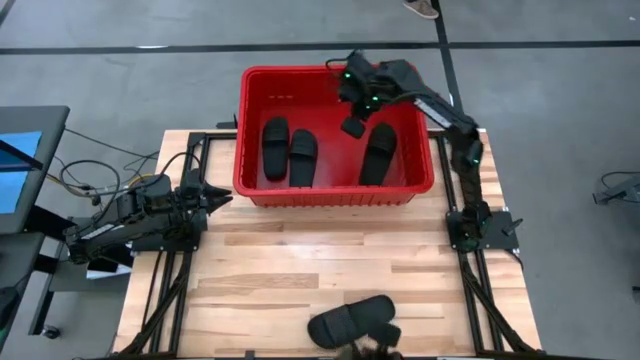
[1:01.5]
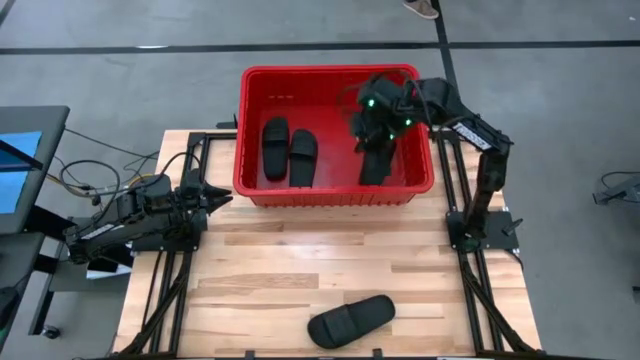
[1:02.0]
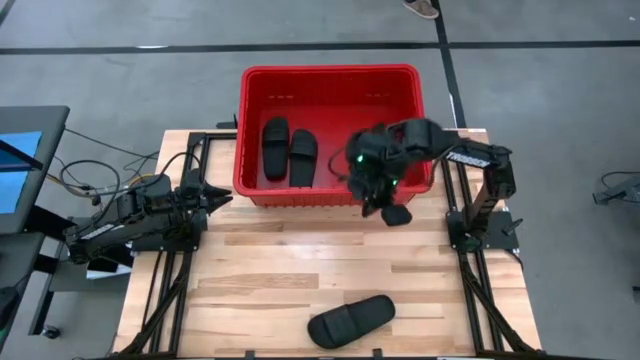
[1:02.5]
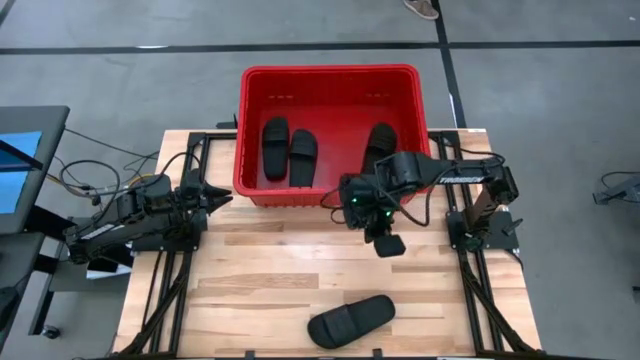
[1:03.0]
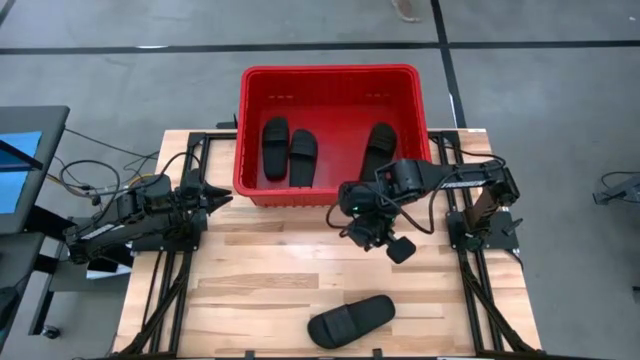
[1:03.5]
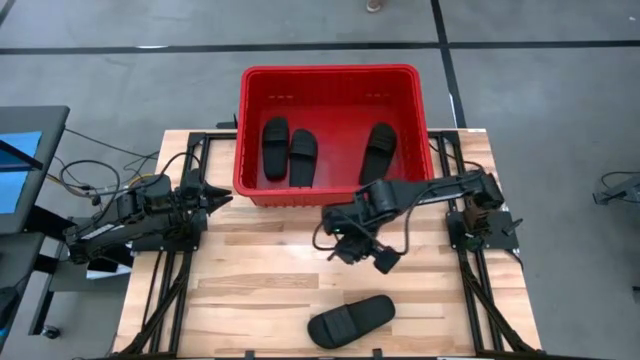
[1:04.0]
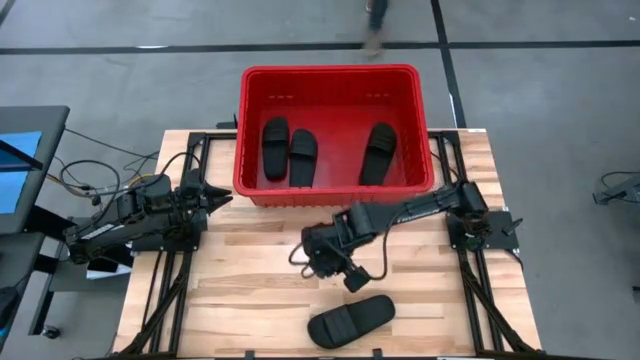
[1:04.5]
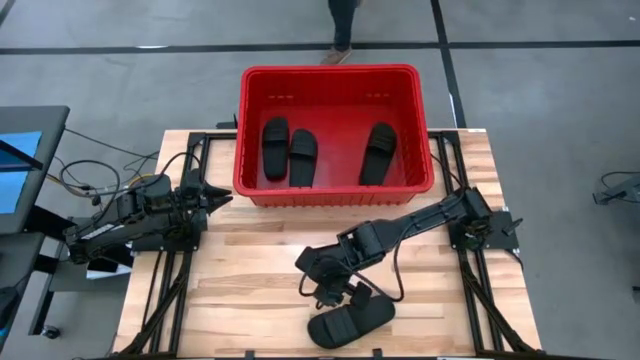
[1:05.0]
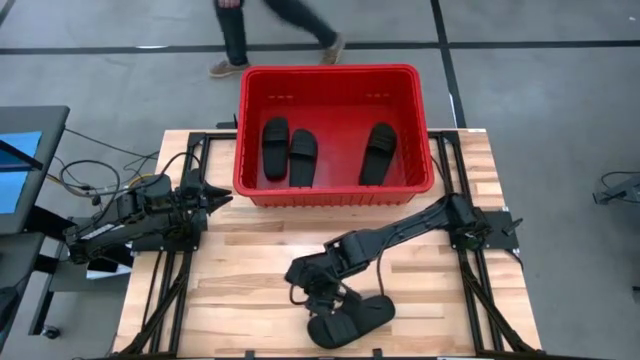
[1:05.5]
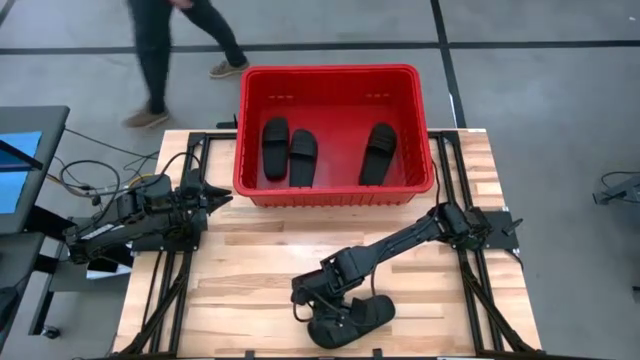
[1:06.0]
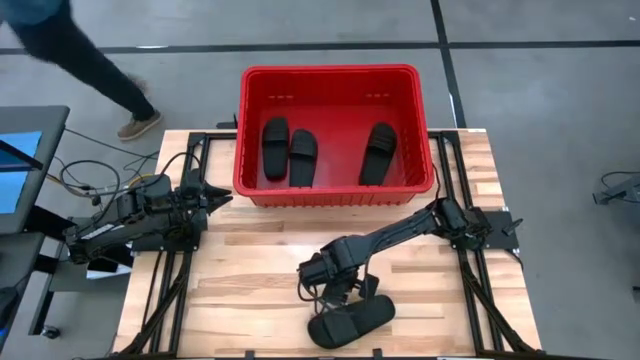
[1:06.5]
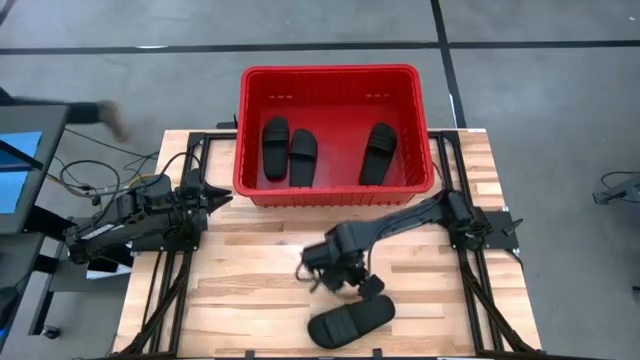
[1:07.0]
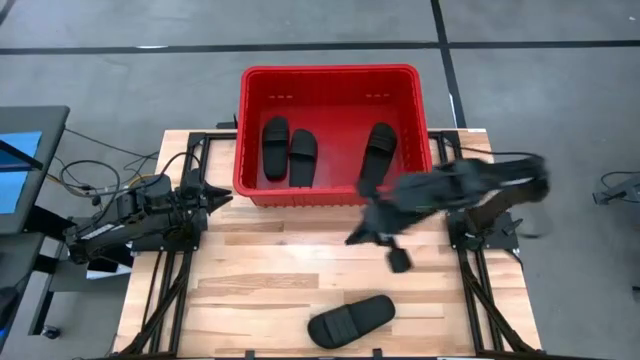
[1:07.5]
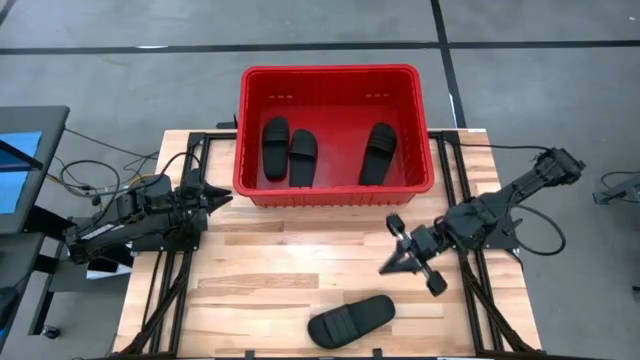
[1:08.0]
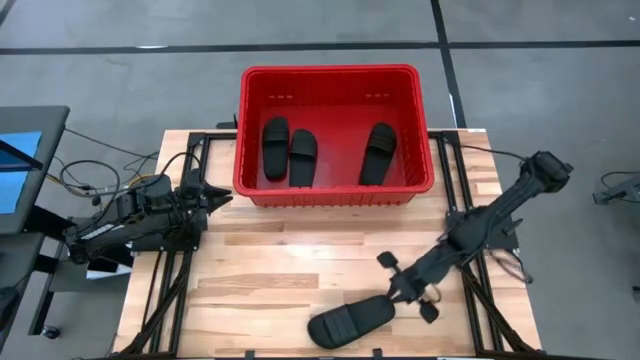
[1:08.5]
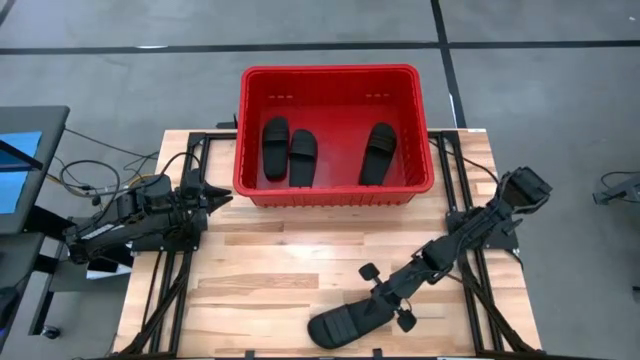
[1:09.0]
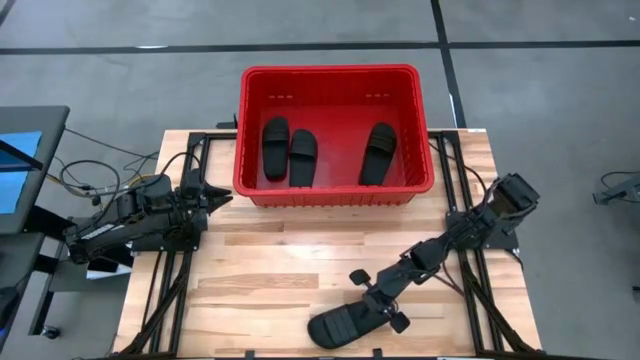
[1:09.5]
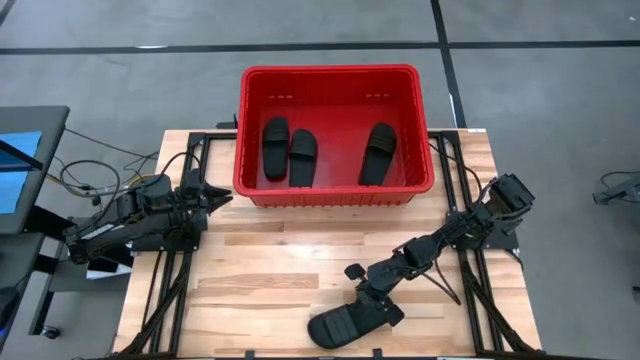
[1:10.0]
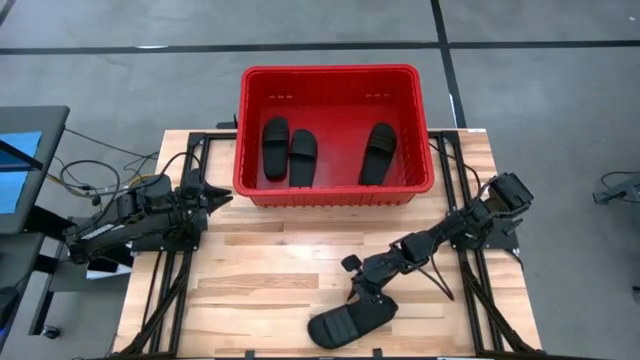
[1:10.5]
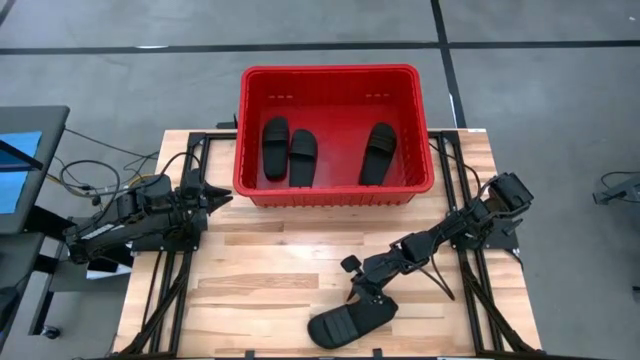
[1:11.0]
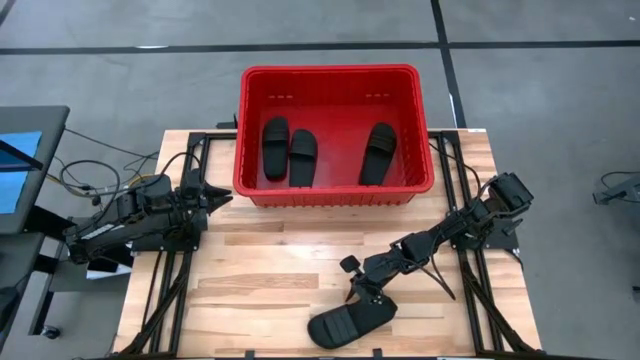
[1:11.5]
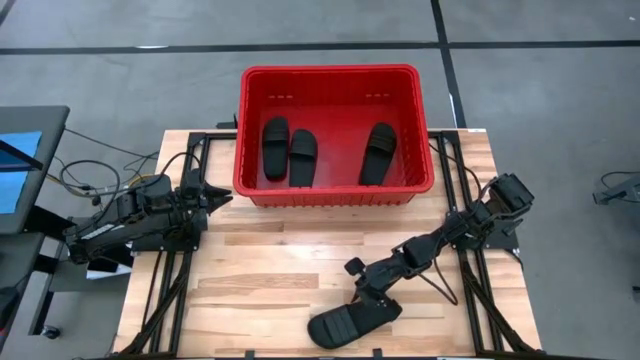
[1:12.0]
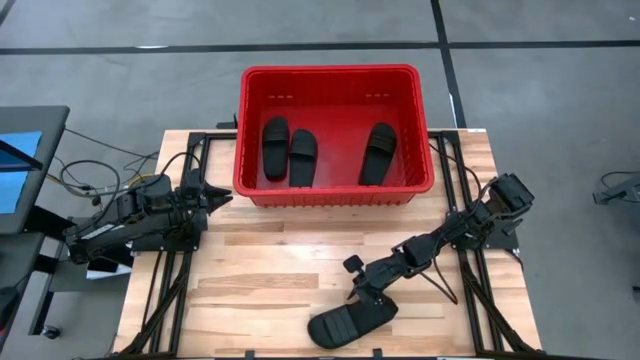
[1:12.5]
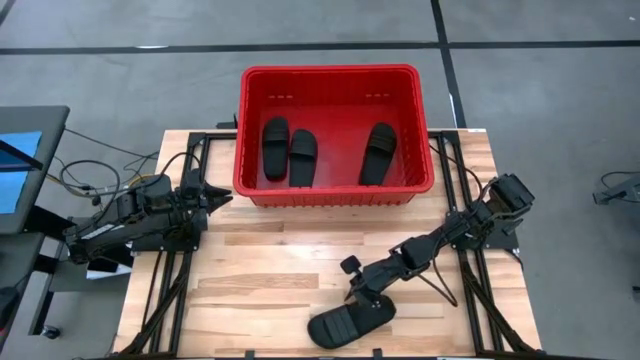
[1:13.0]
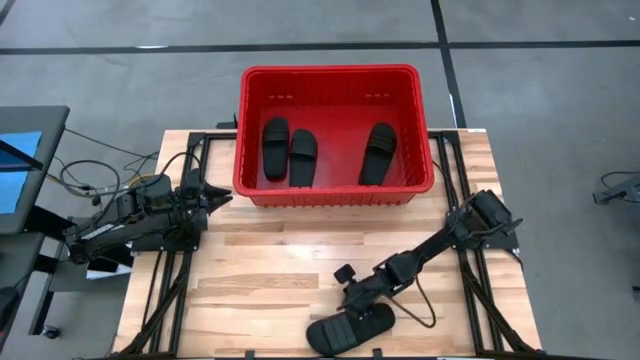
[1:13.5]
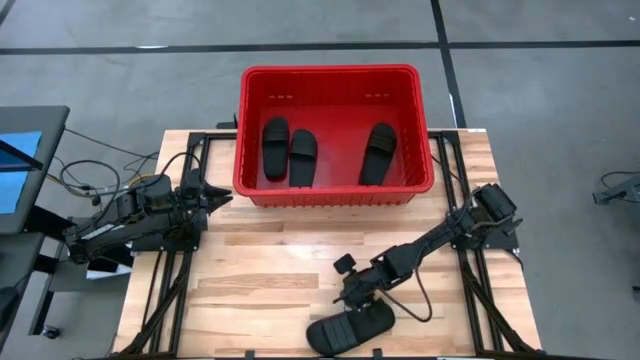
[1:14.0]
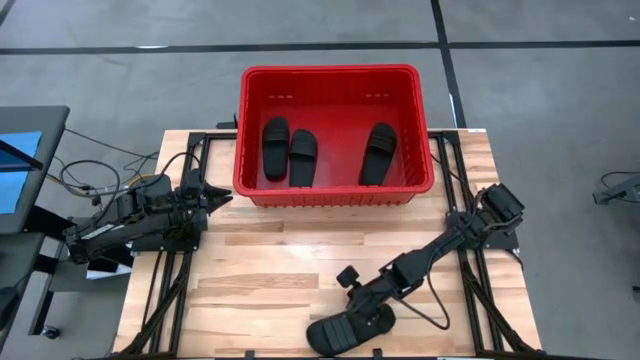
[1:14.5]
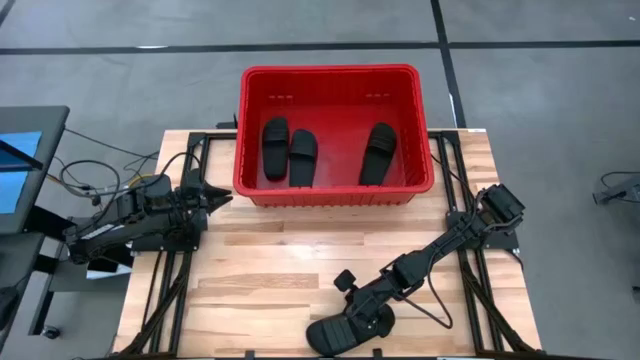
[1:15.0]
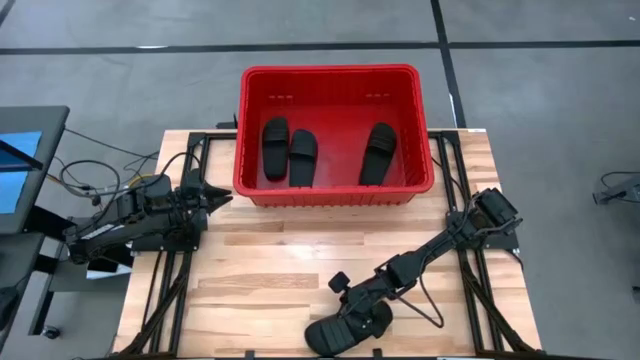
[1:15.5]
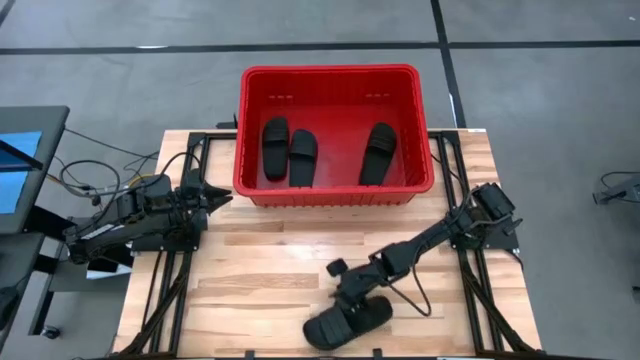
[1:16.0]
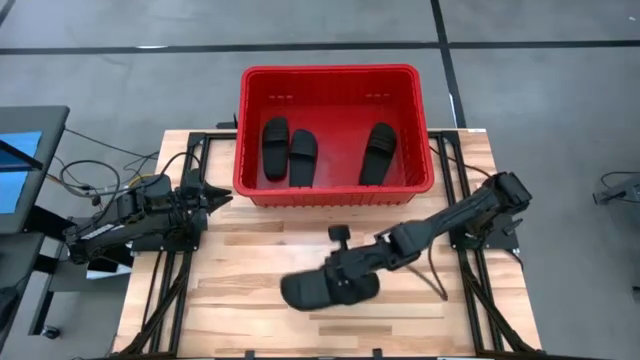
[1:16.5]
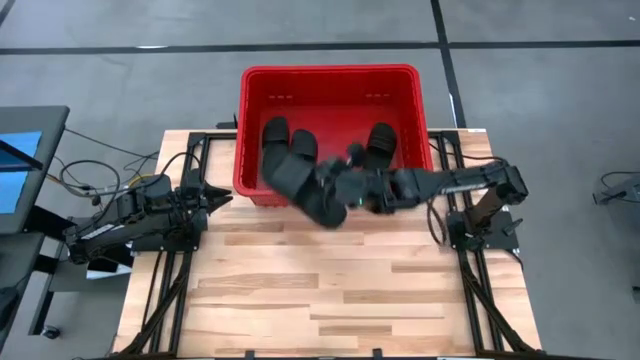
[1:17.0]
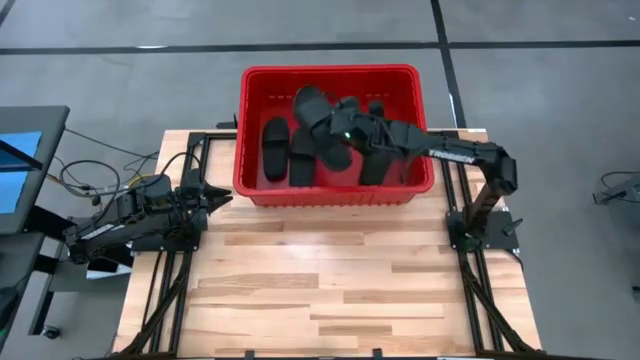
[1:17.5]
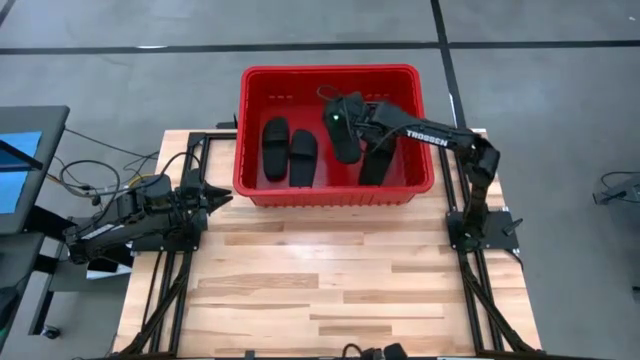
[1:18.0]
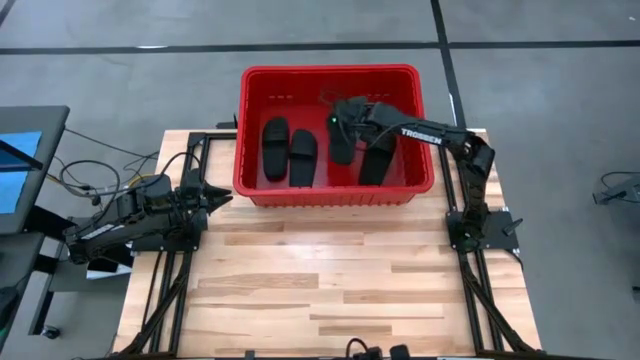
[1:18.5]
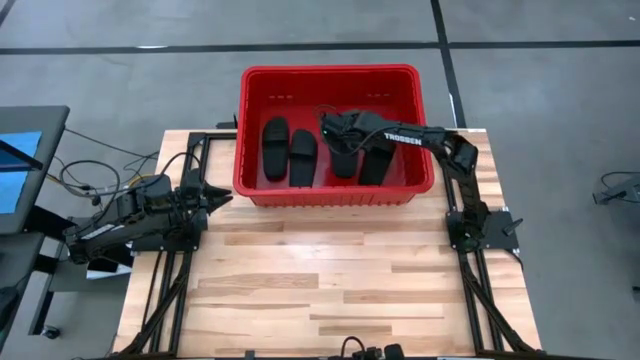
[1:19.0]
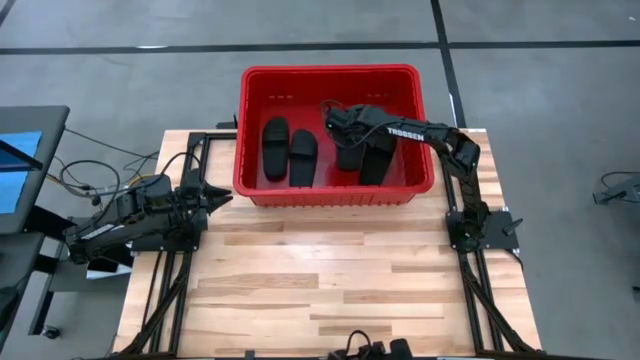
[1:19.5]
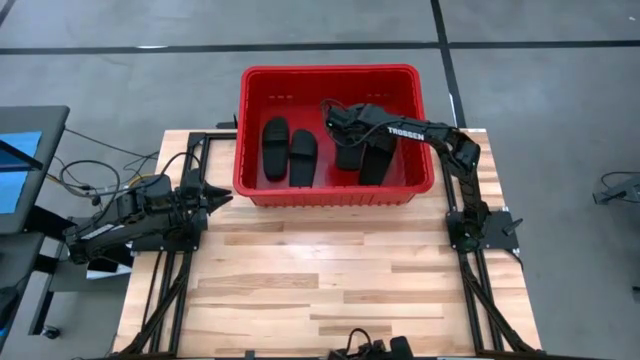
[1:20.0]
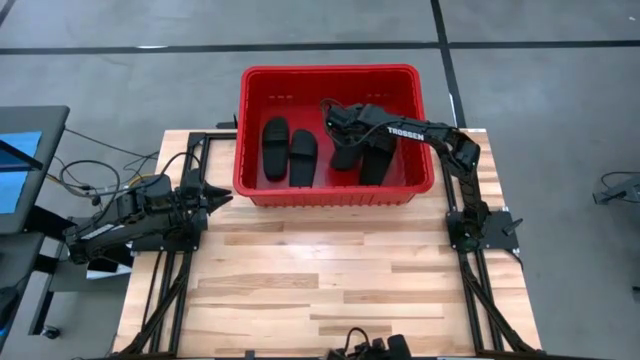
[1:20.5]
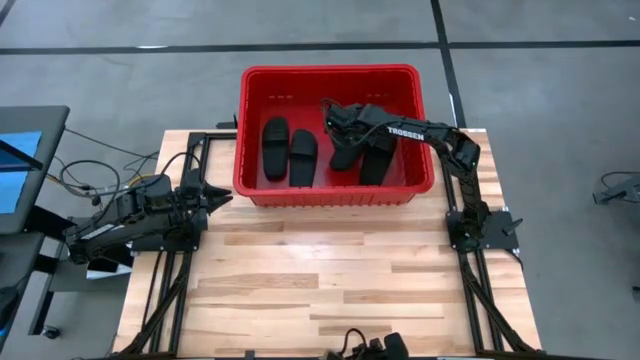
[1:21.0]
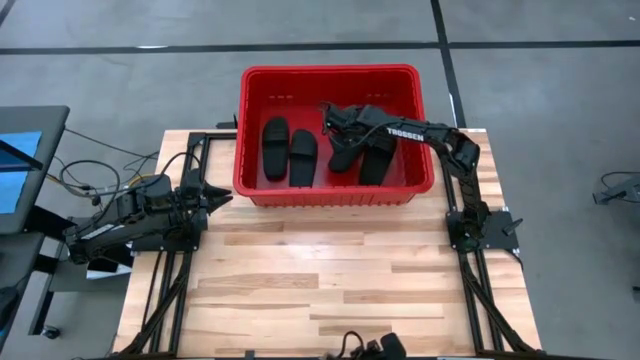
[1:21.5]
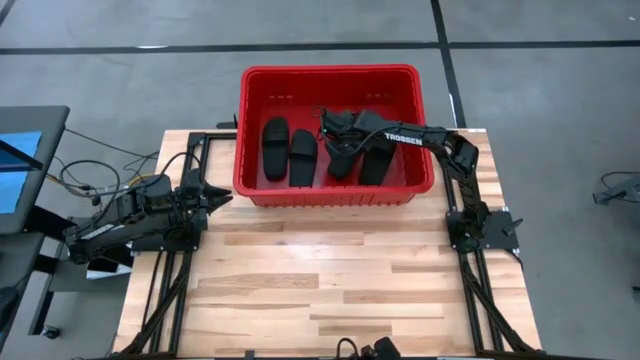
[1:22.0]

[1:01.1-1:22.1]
Task: Pick and place slides into bin
Put the black slipper into the red bin
